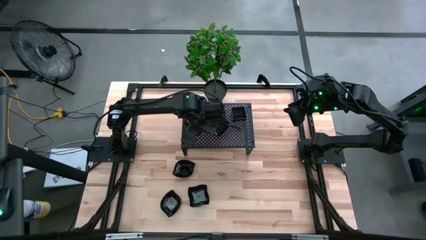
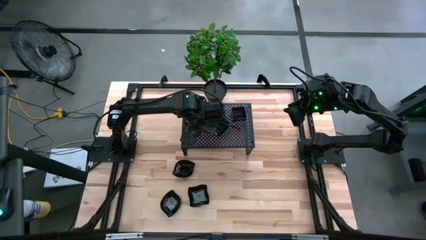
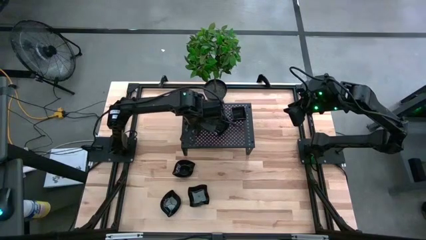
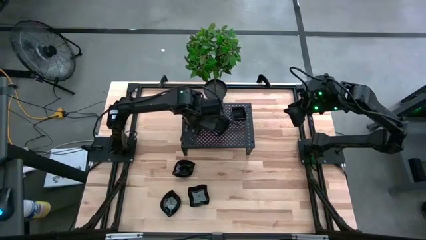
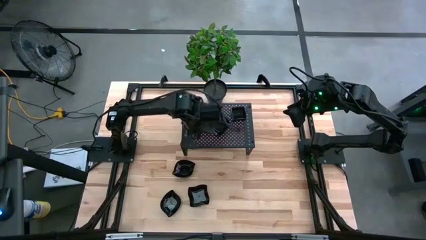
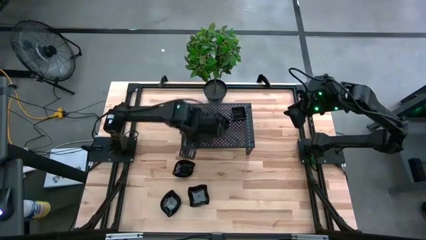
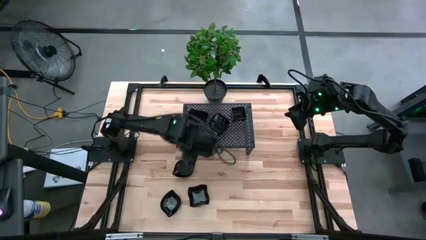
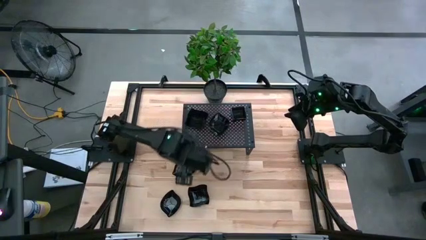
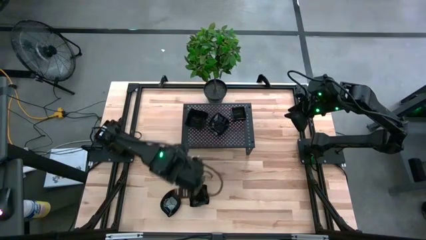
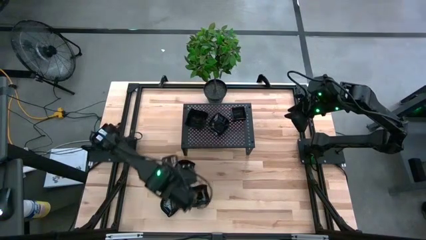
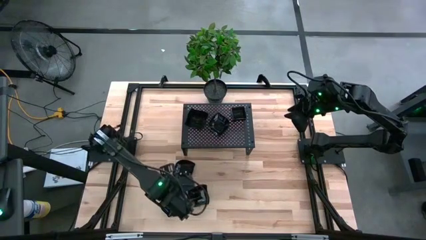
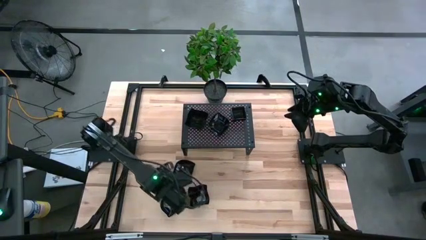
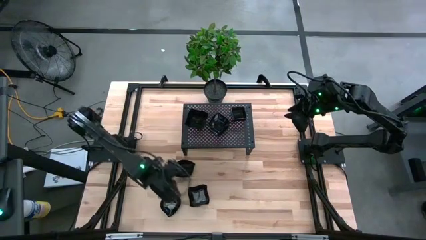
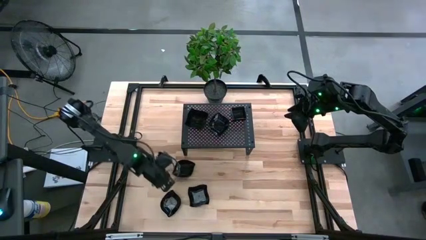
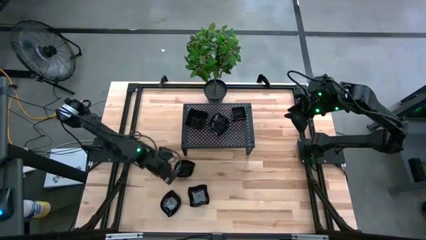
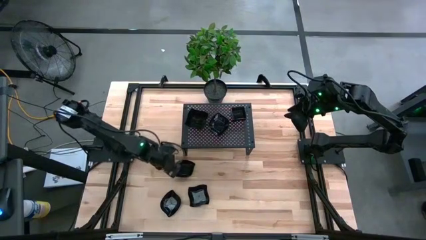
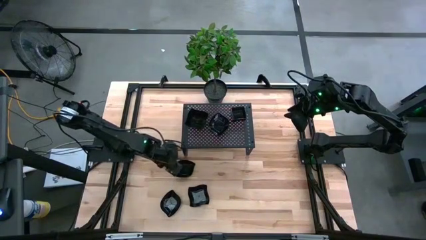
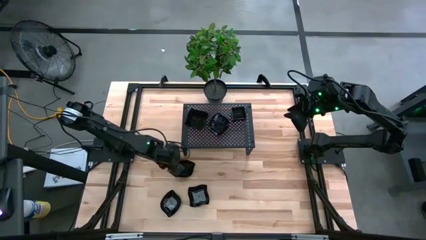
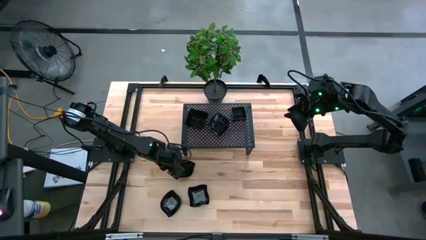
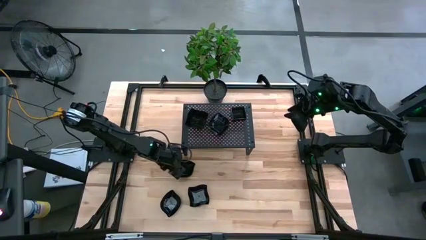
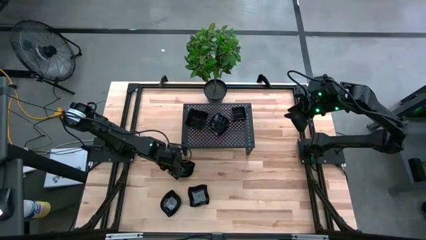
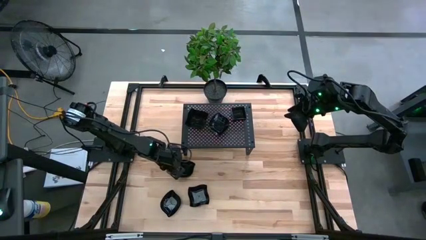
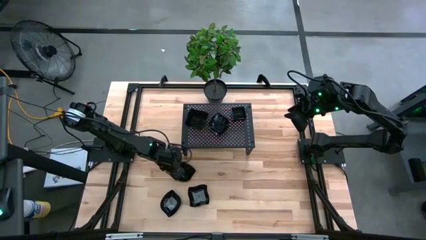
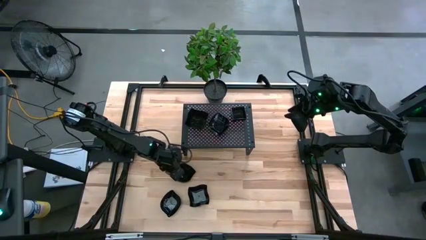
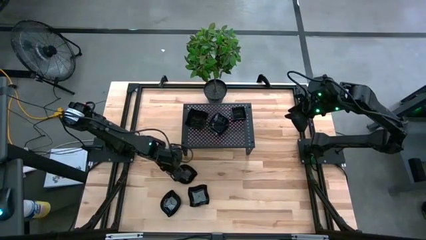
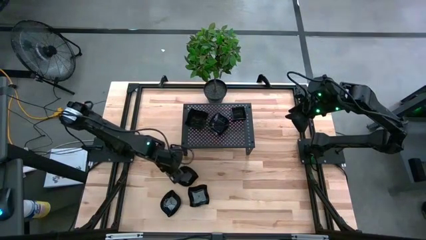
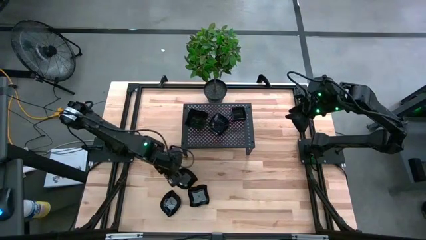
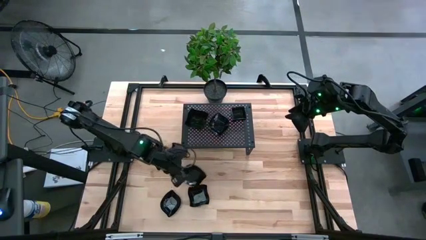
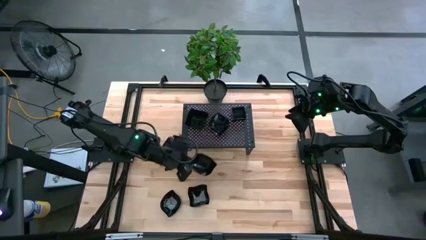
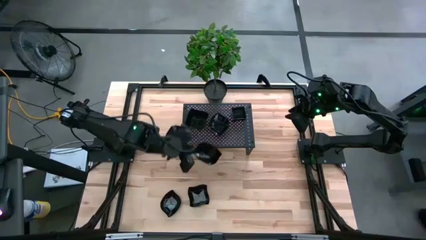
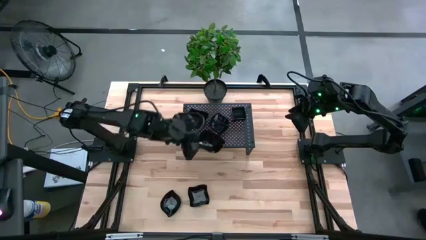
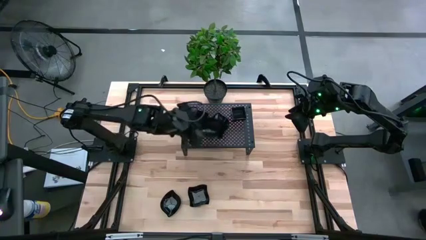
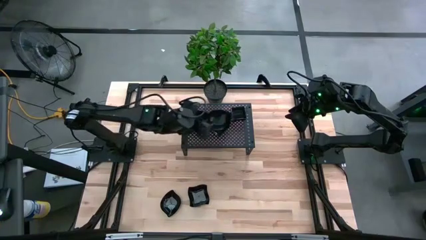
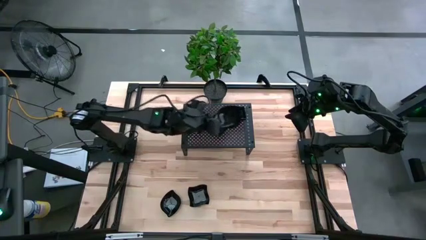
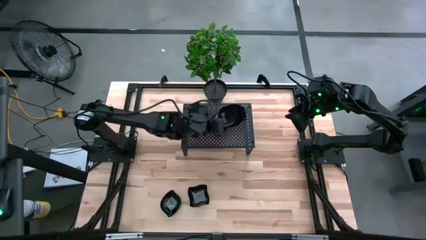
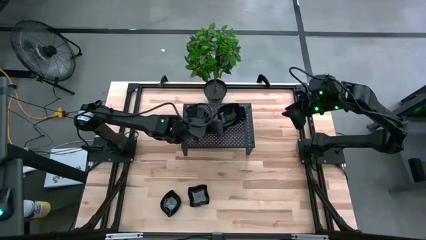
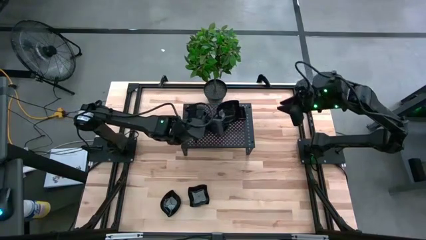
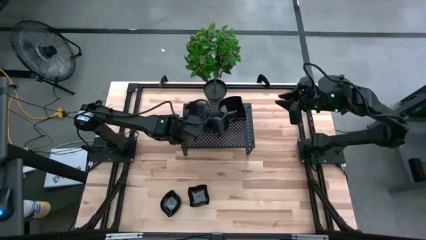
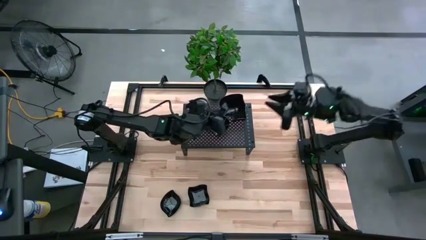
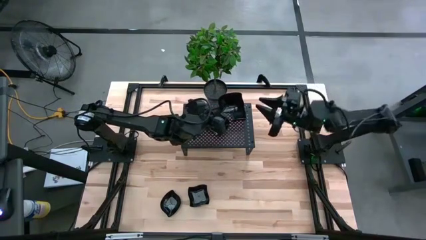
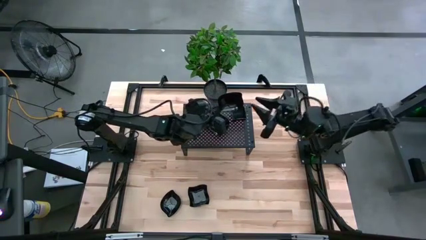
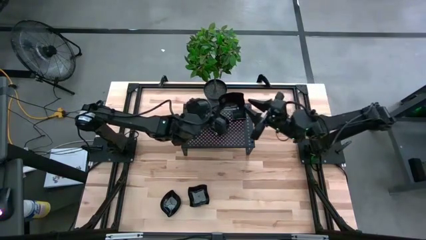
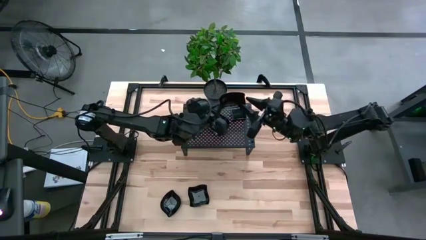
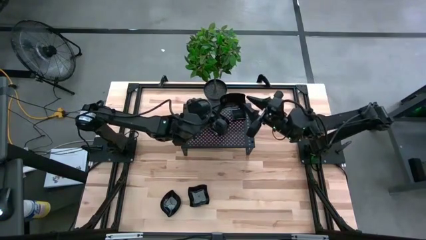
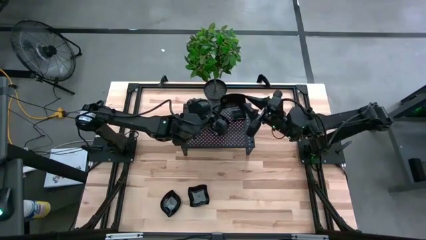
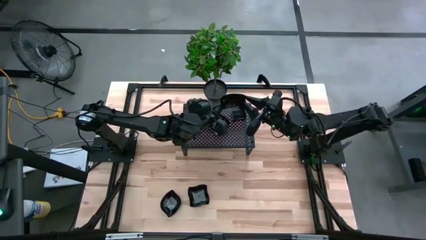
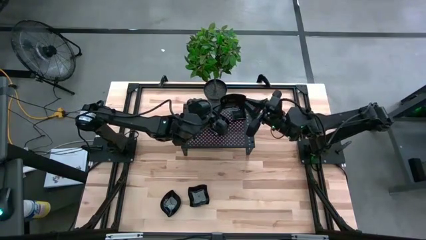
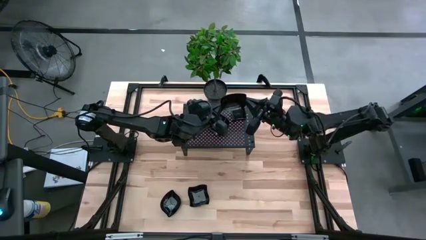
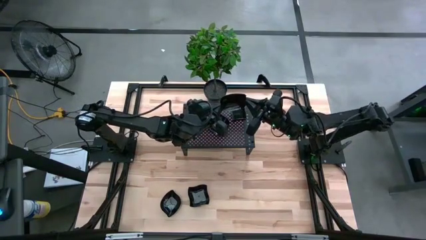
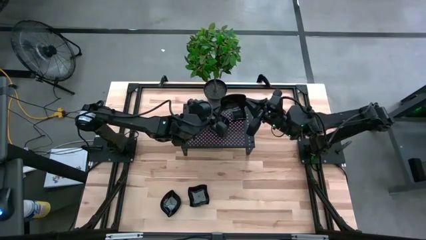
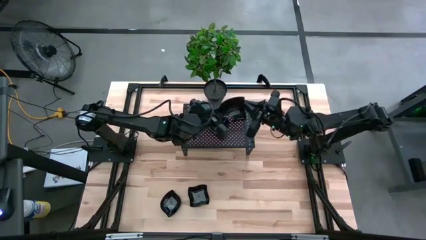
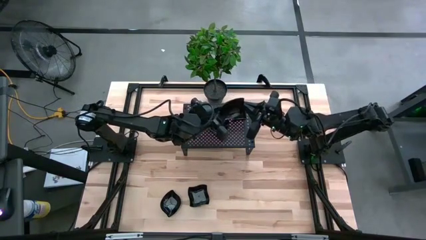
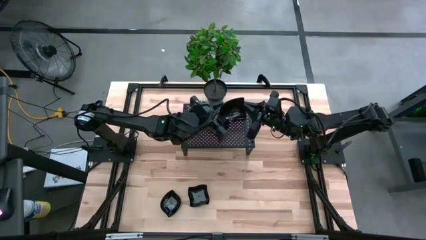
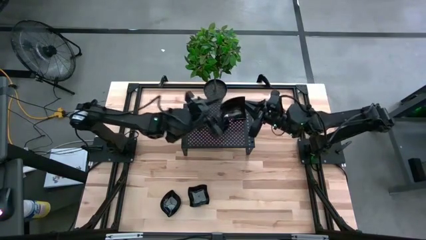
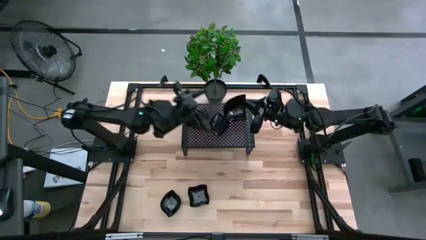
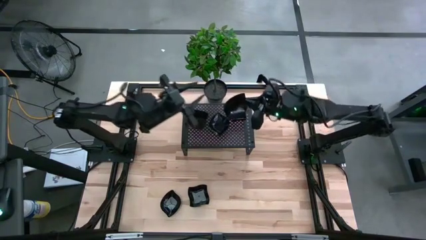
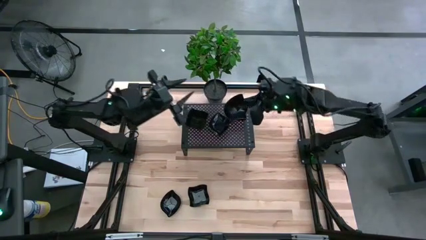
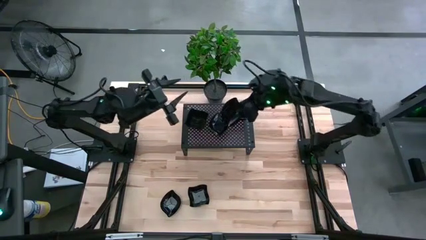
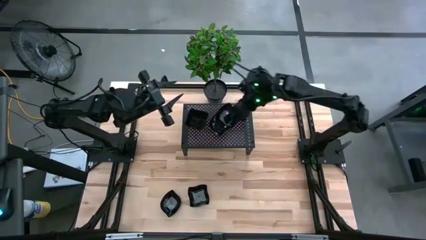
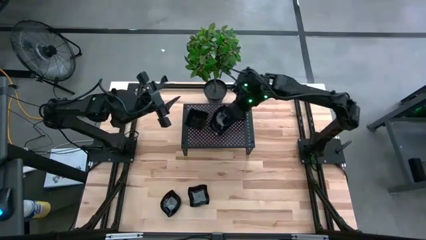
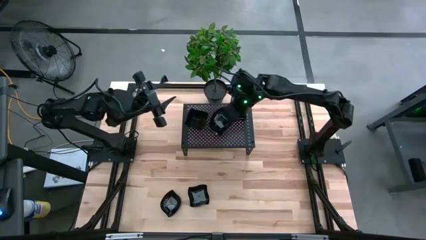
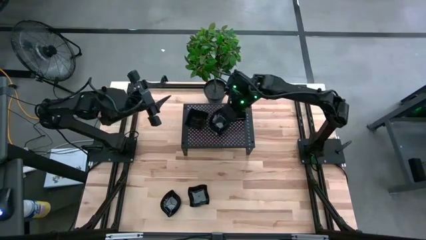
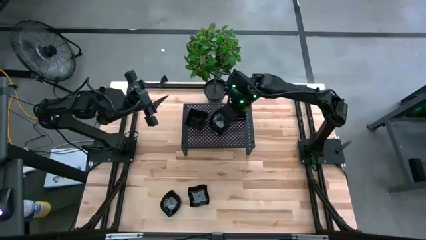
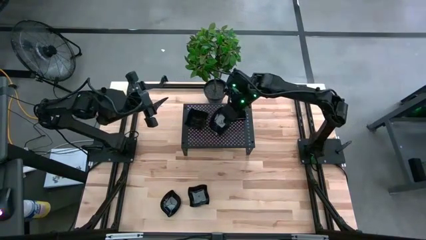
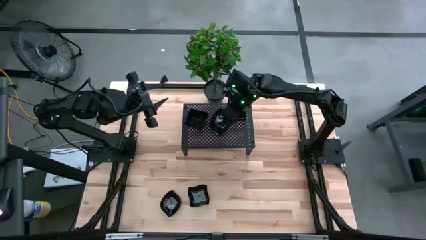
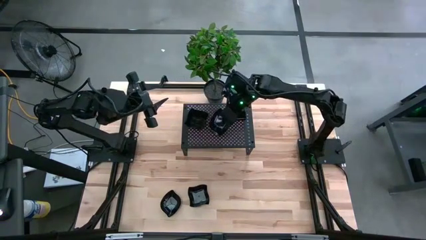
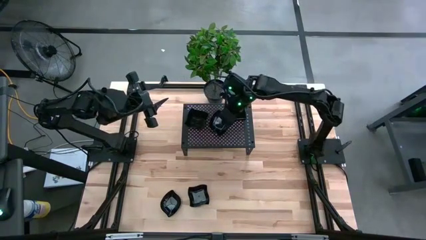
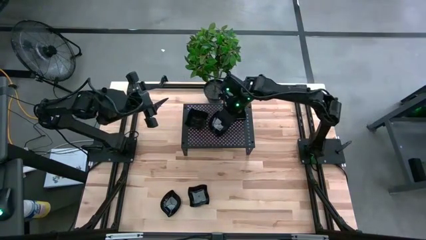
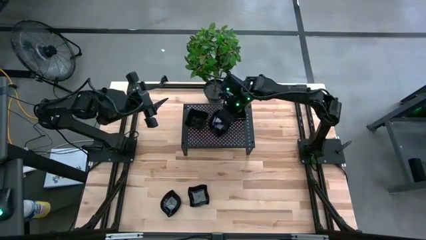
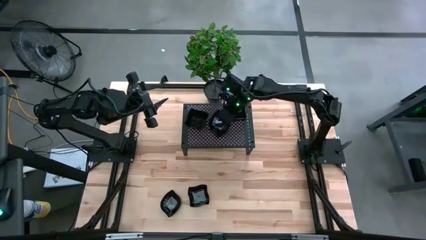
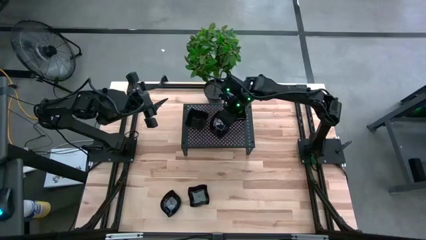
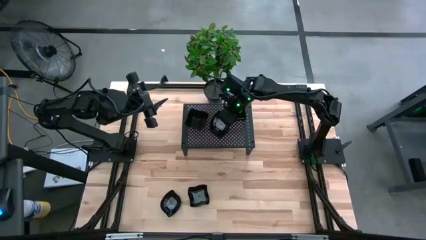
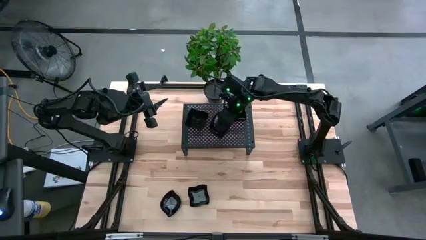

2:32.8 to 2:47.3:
Task: Pick & Place Mini shaped plates
Stack the black leaf-shaped plate on top of the other black leaf-shaped plates on the shelf
